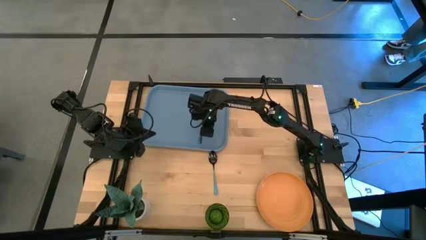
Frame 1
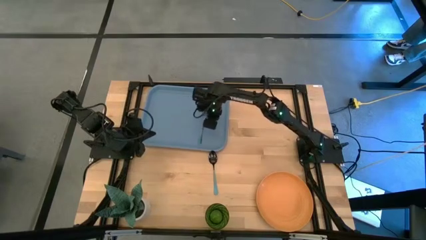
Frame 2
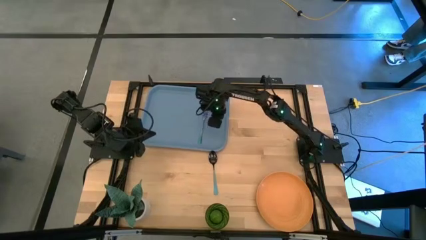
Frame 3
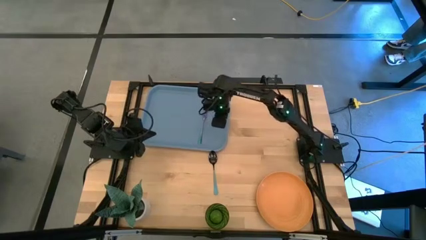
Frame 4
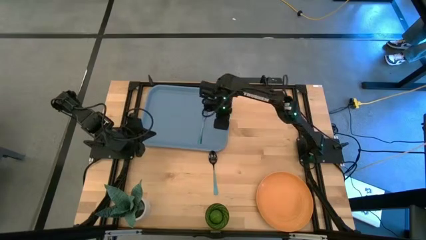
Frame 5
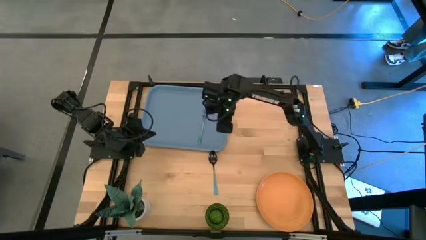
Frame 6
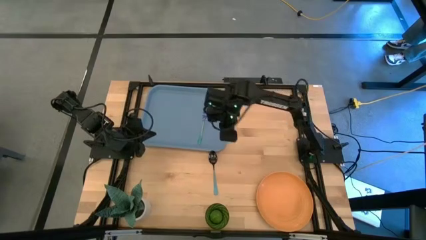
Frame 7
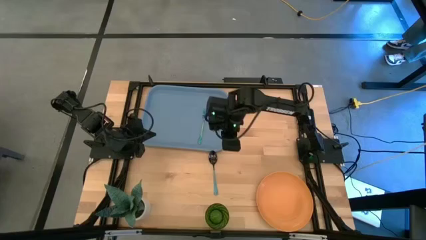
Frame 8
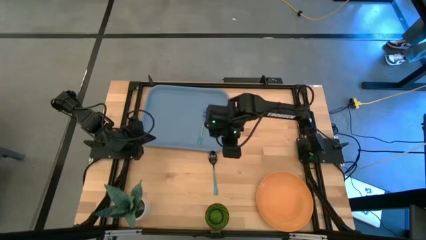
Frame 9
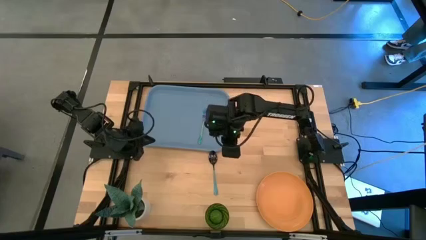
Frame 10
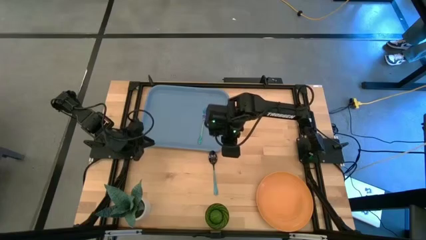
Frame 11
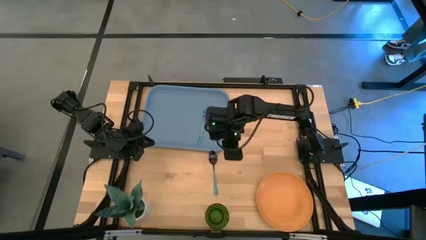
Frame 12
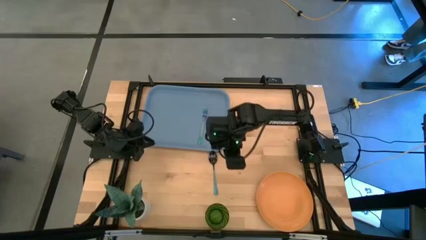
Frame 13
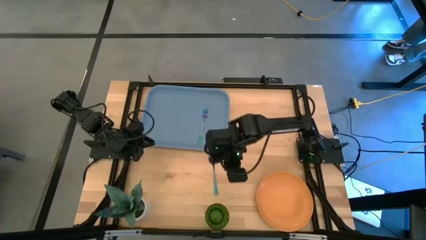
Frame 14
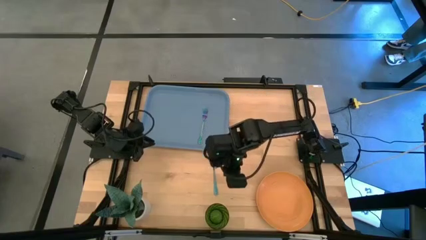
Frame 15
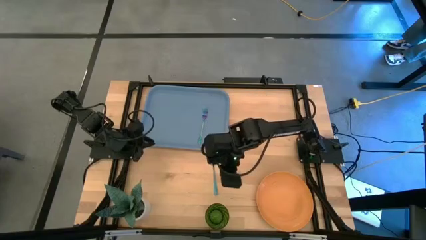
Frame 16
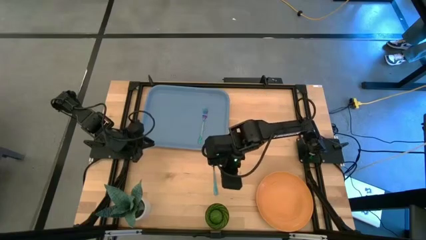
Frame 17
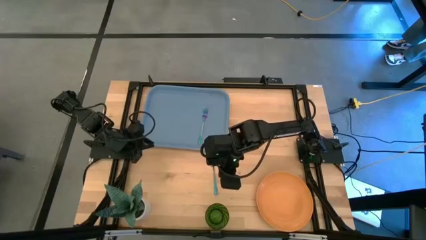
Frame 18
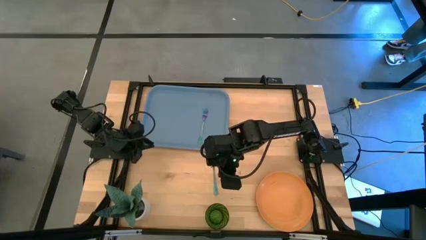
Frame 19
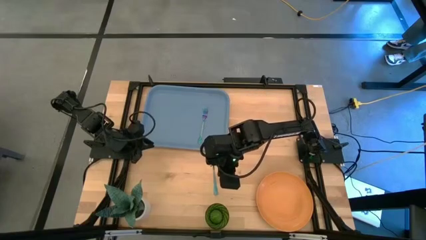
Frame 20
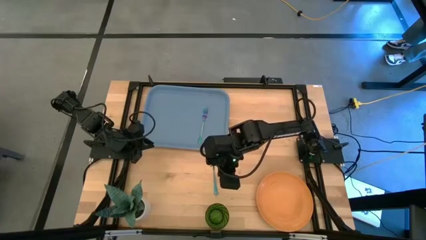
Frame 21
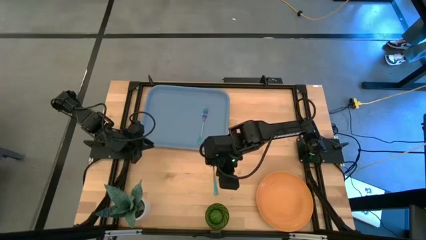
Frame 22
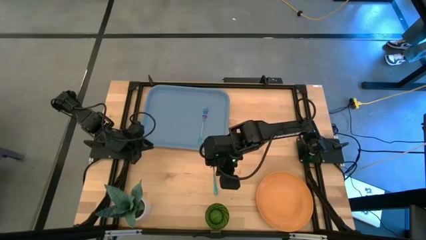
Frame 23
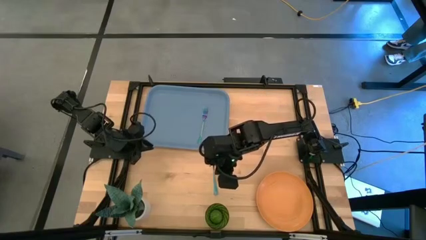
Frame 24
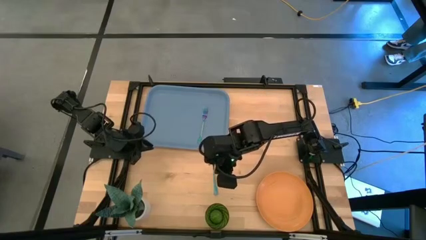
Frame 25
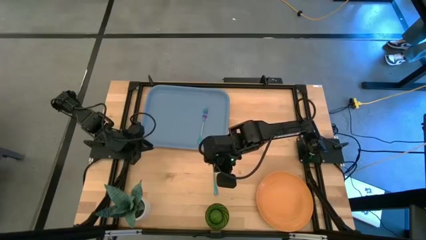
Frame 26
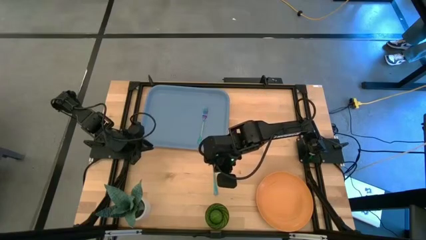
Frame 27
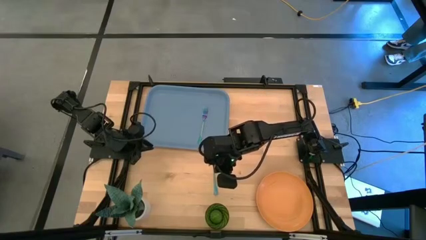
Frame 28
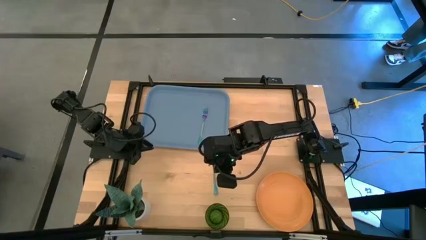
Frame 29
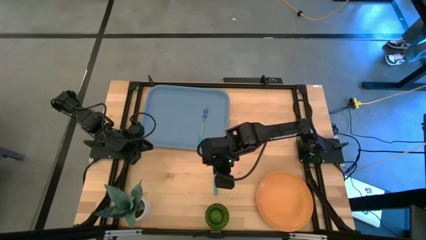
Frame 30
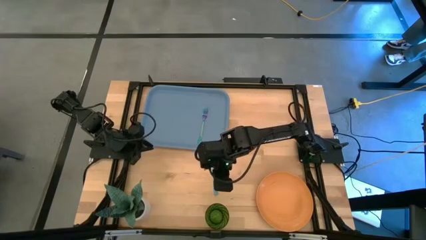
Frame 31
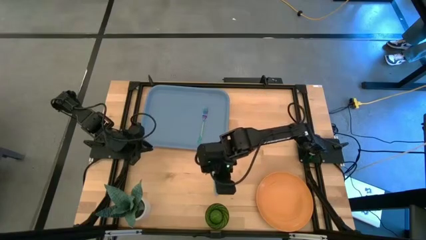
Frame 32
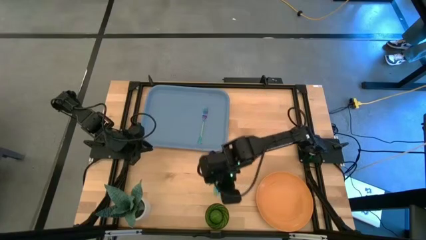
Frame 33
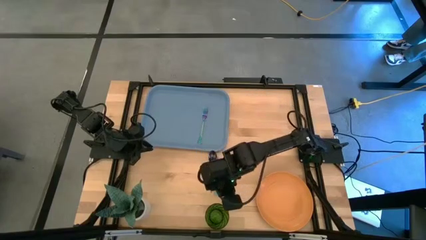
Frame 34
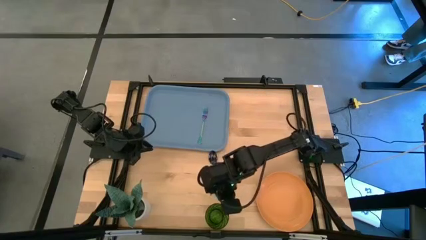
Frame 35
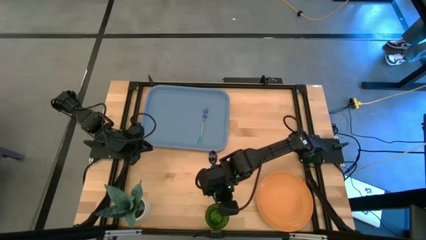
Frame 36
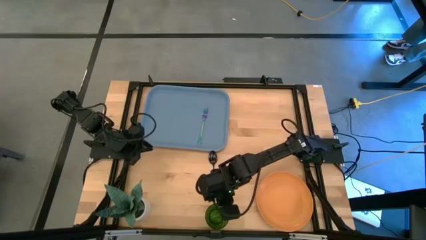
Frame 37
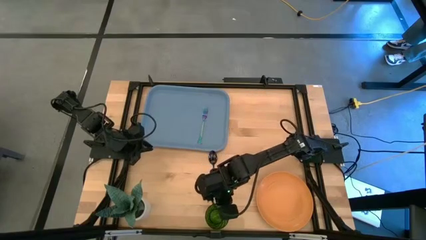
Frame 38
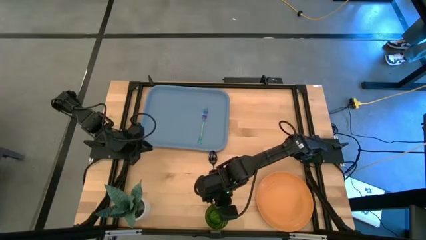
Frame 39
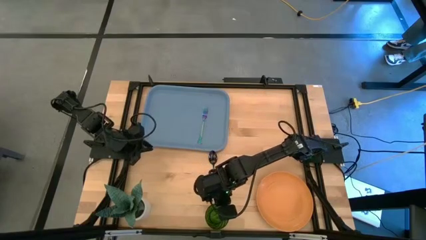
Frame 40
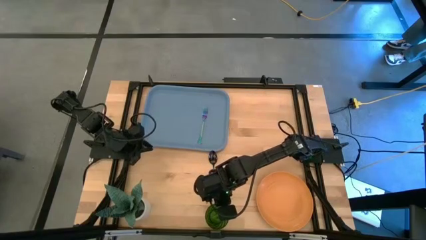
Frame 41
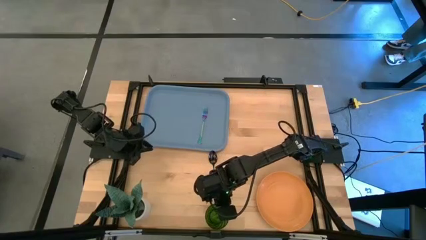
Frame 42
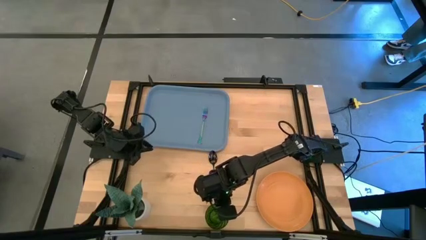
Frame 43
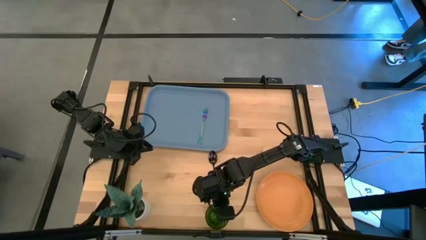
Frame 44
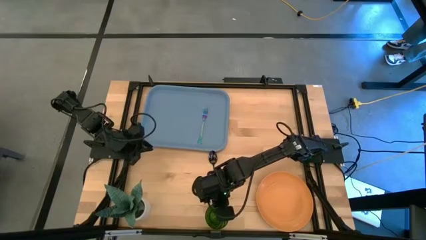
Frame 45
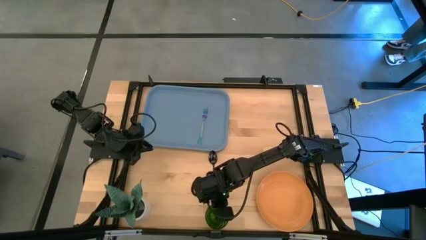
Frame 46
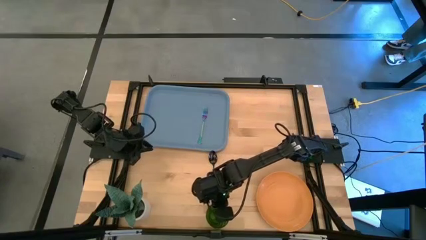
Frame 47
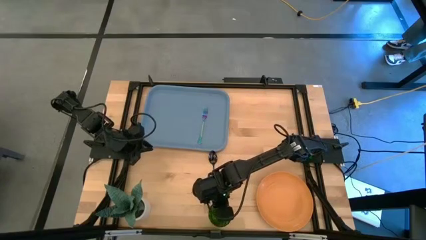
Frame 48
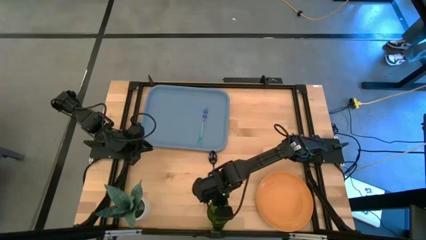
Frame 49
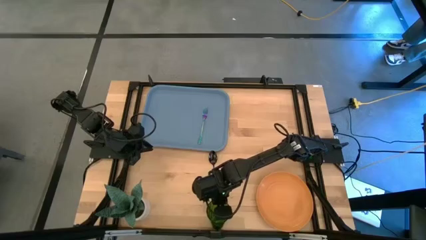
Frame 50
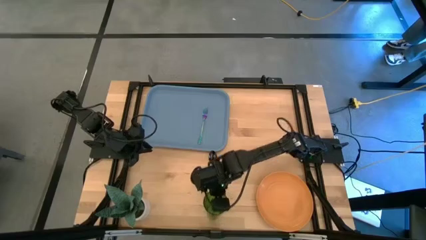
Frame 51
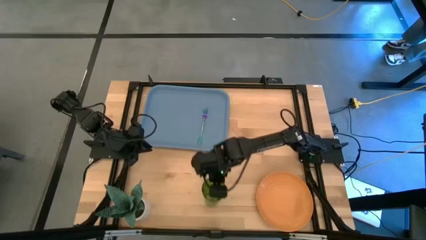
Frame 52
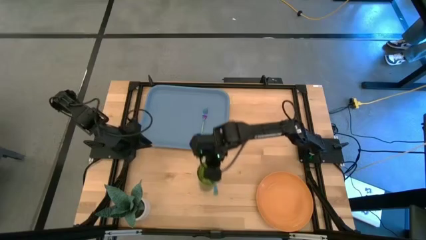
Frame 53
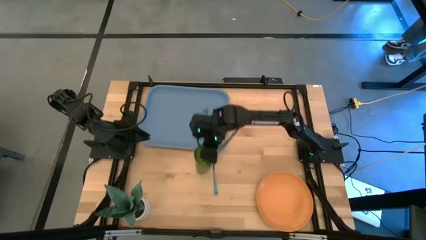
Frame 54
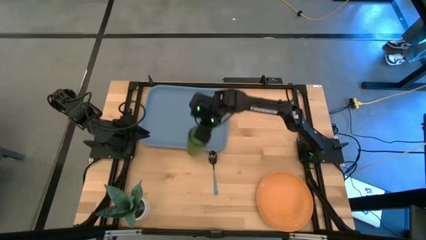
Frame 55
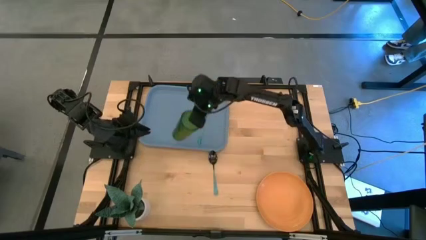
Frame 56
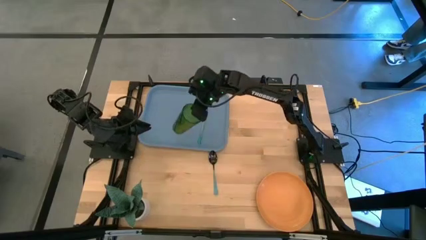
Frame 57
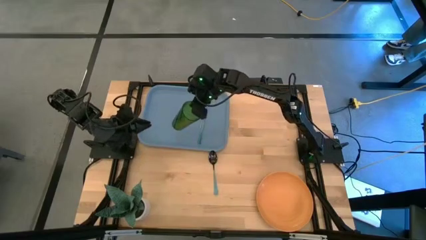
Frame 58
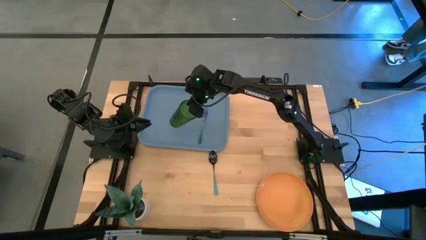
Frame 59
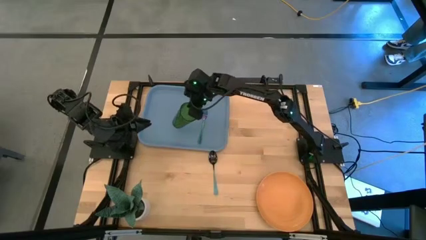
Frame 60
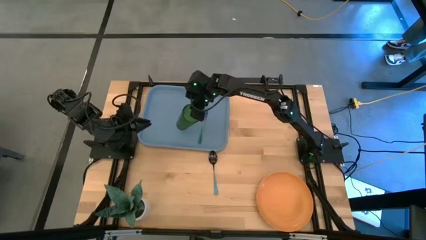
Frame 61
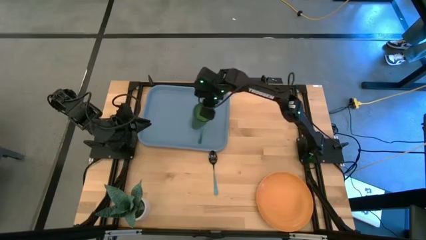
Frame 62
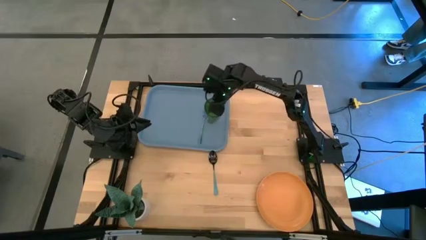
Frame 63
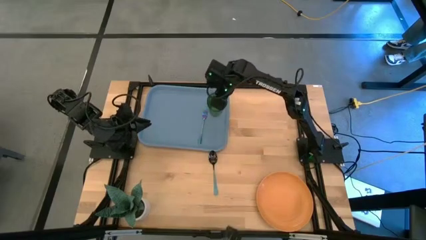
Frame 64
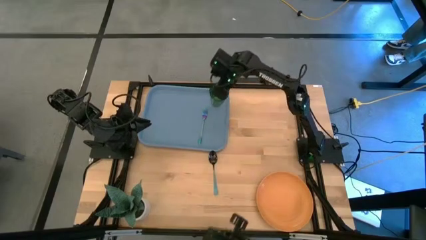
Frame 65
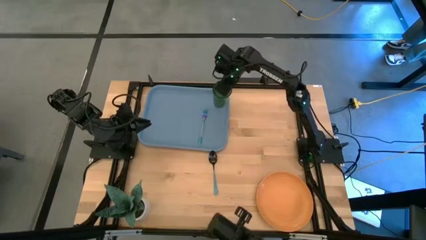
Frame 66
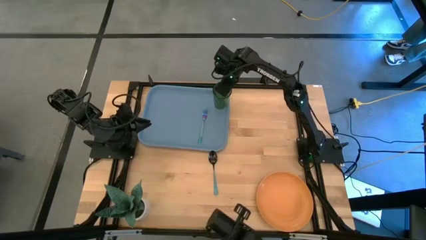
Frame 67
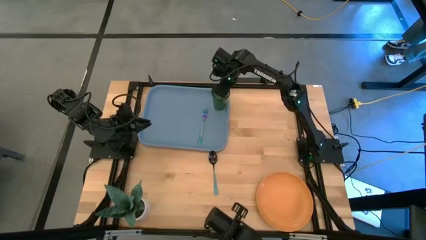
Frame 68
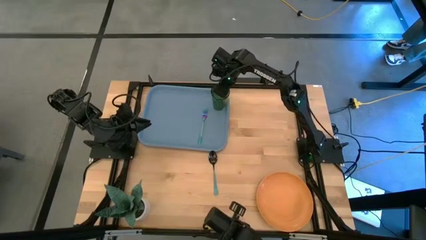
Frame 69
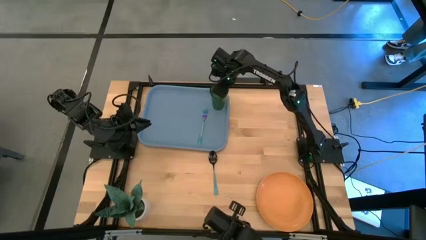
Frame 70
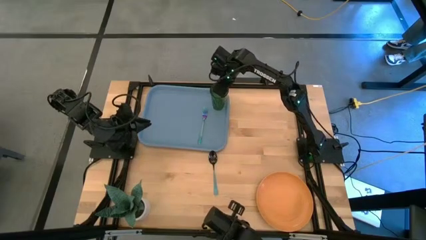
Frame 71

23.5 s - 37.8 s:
Task: Pick and place plate/cup/fork/spoon on tray
Put the green glass on the top right of the blue tray
